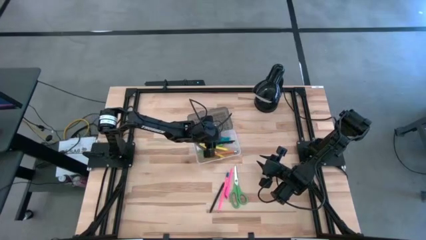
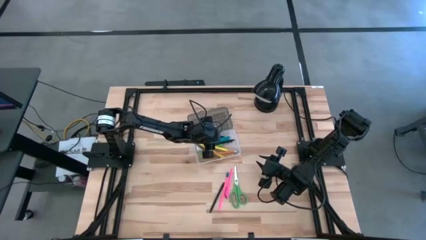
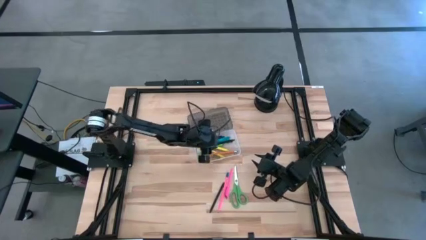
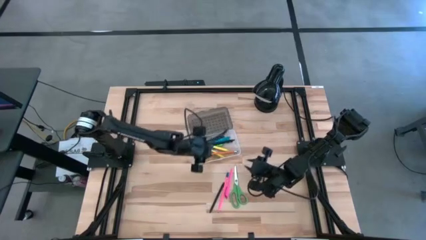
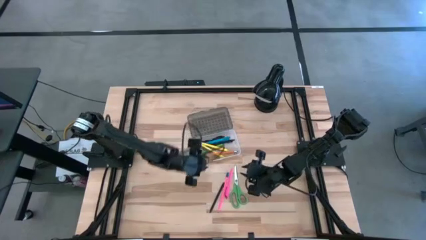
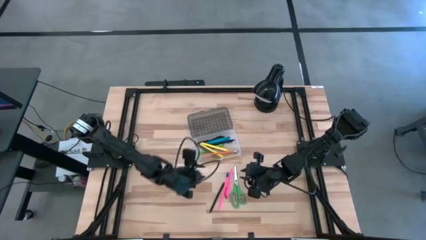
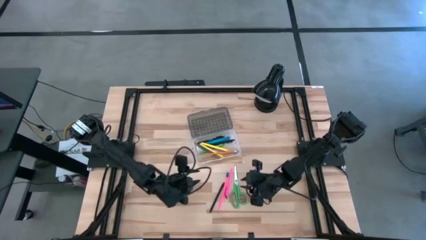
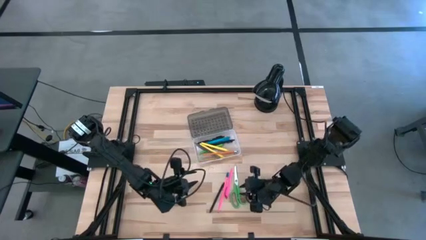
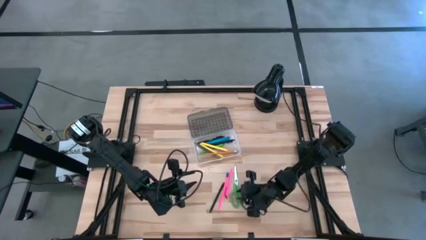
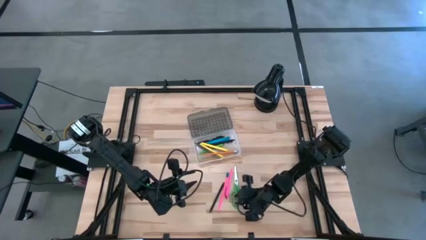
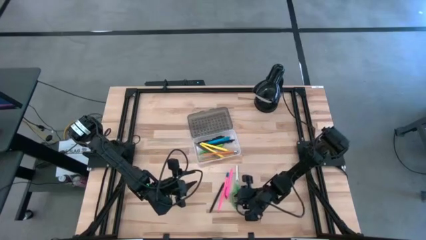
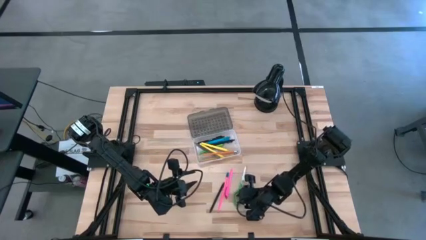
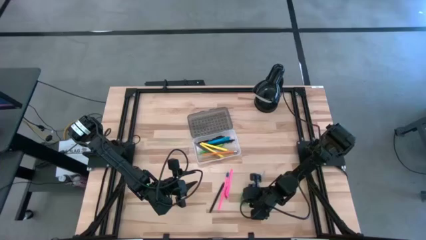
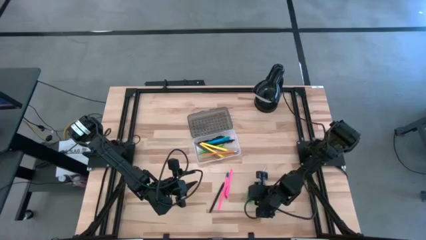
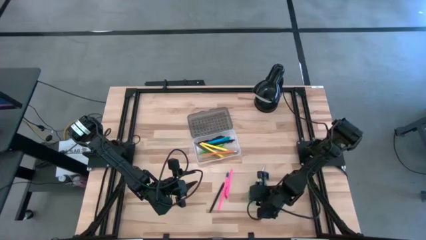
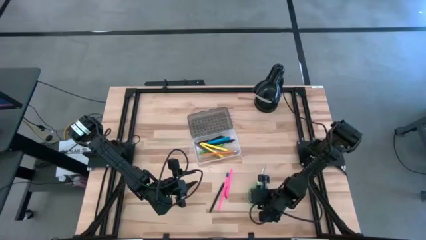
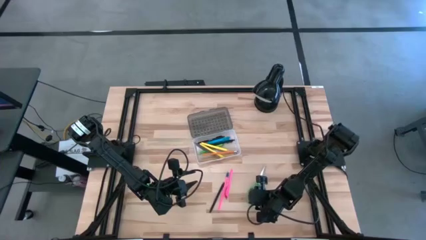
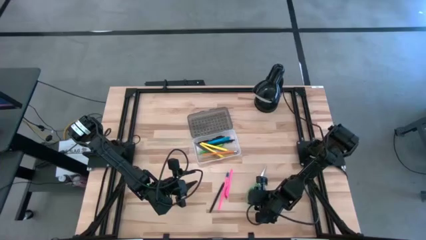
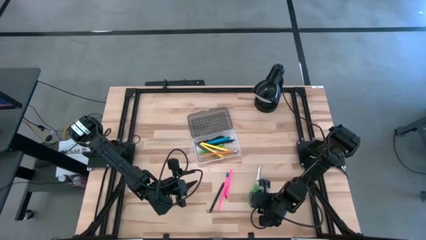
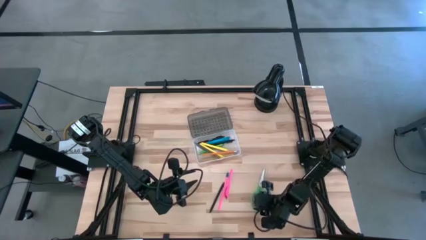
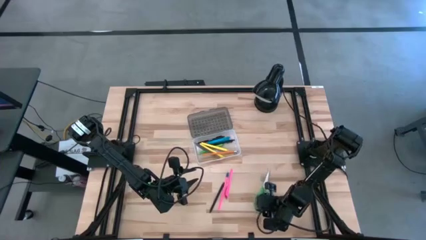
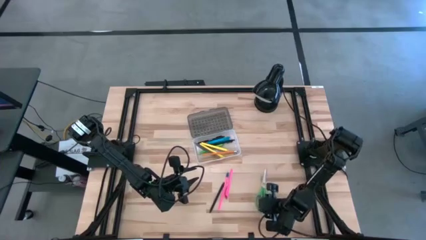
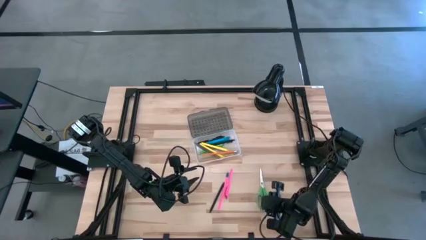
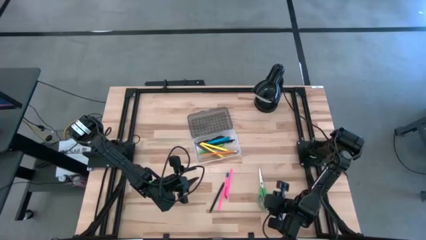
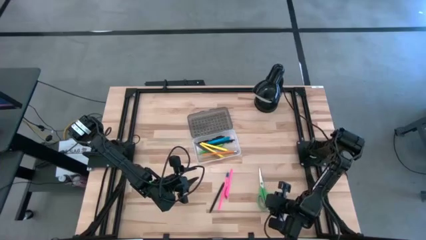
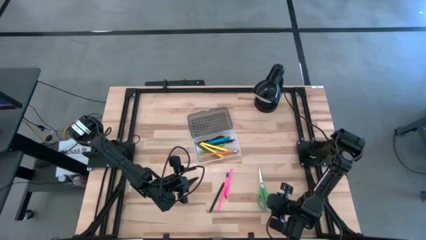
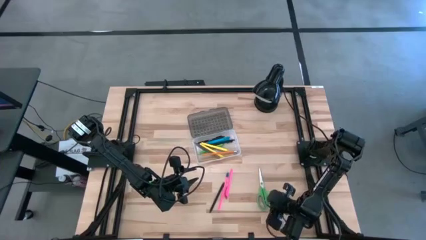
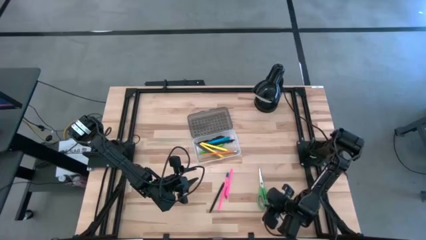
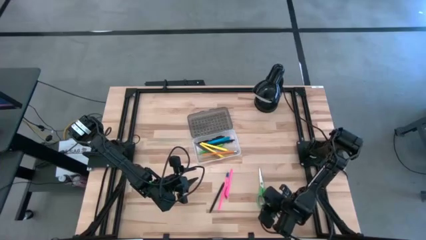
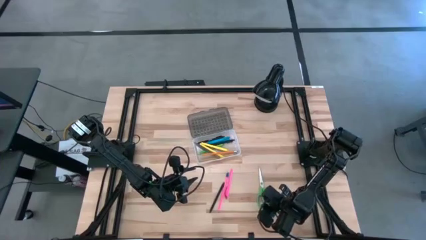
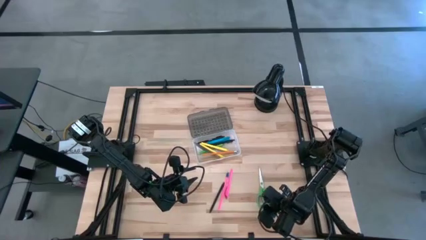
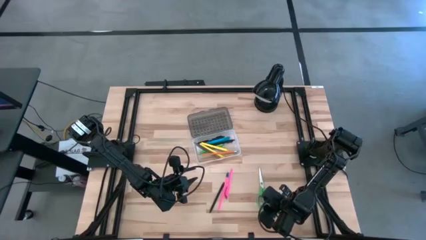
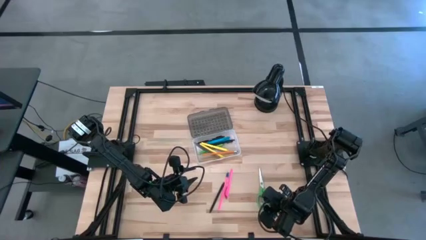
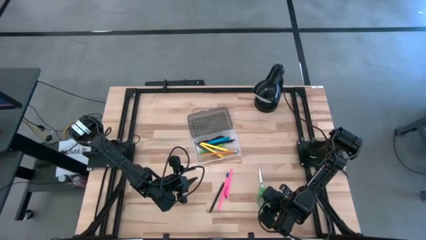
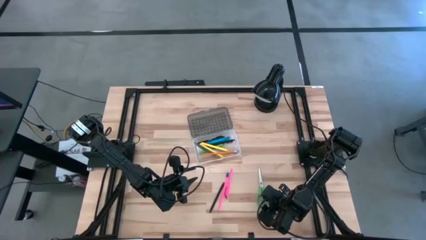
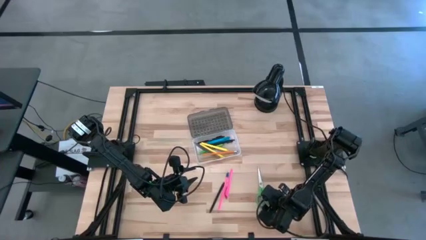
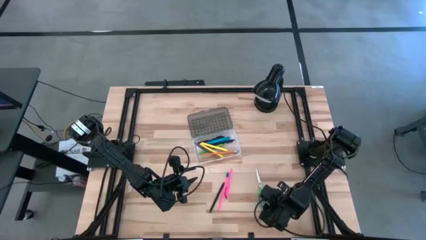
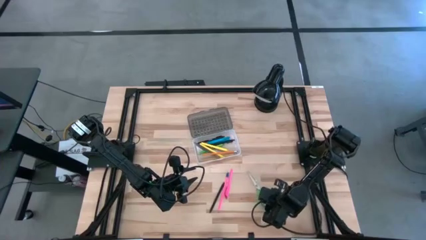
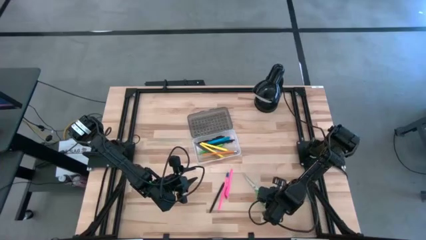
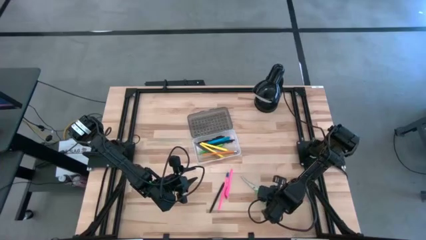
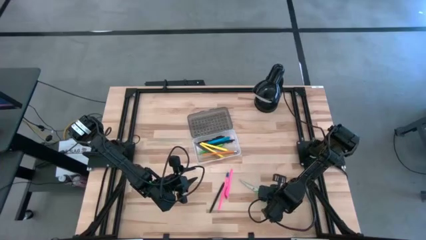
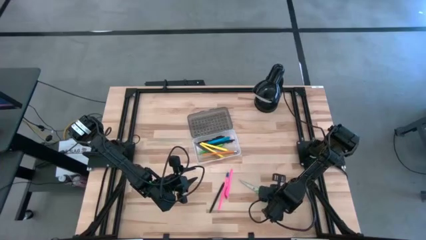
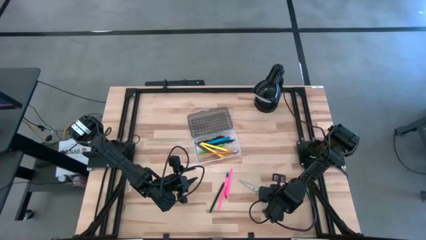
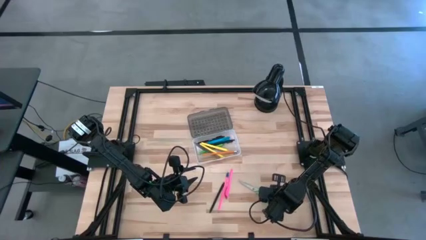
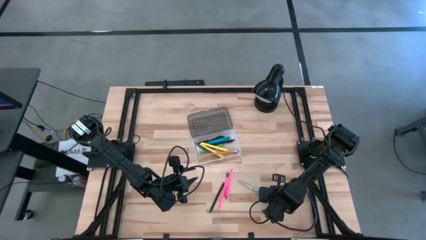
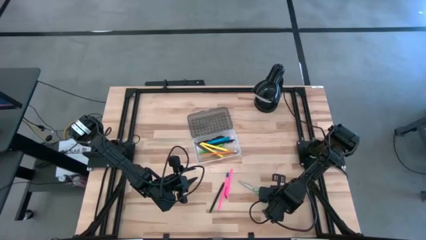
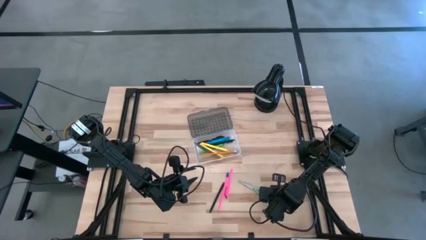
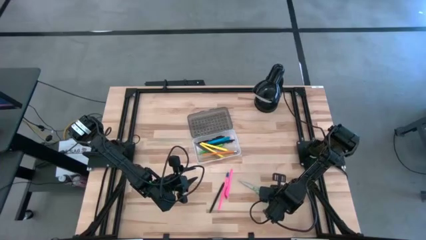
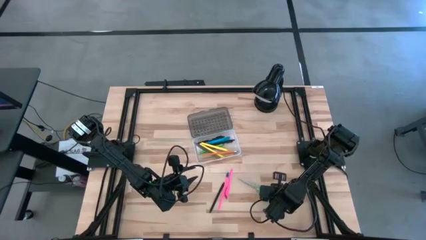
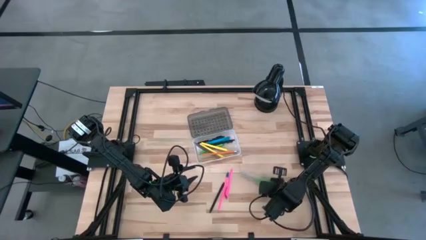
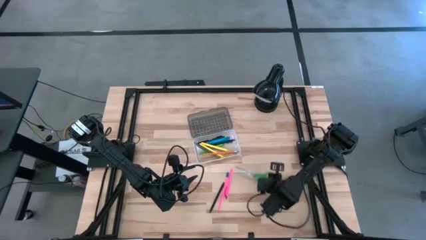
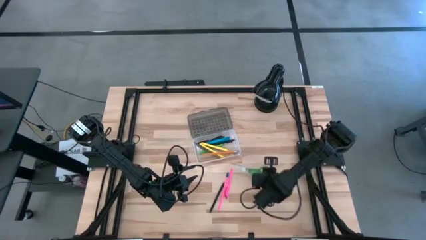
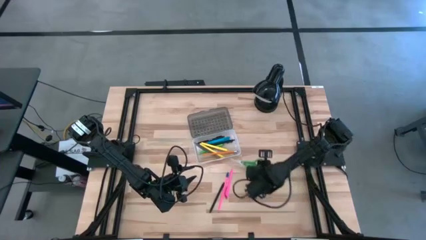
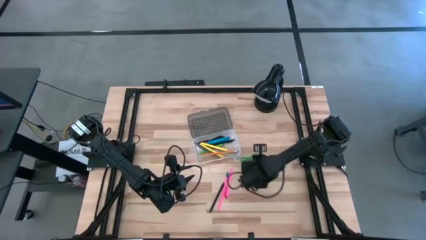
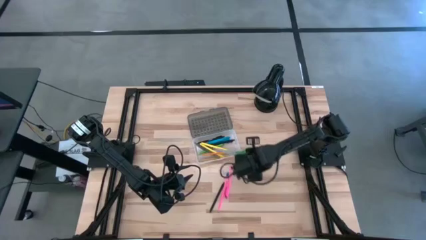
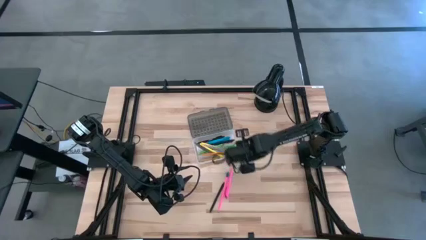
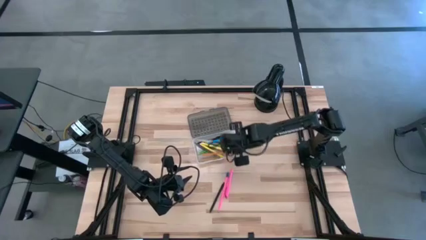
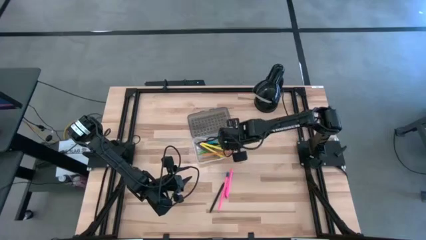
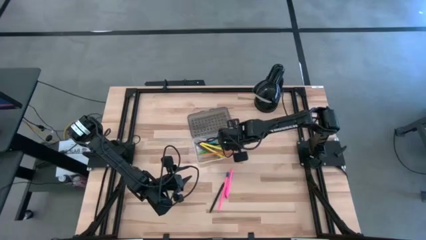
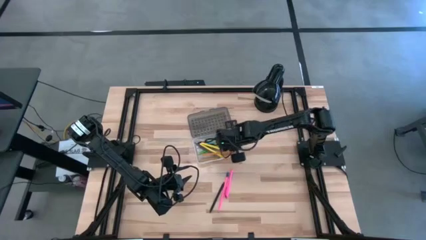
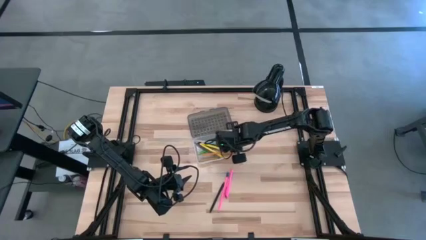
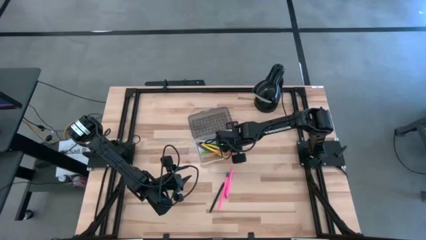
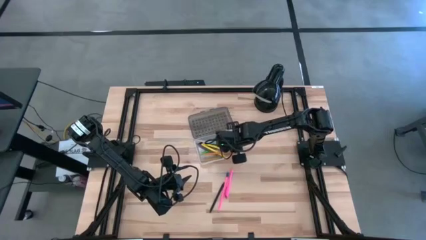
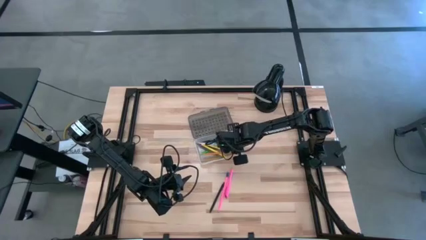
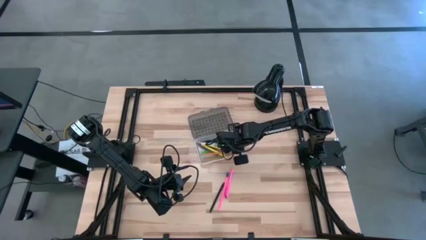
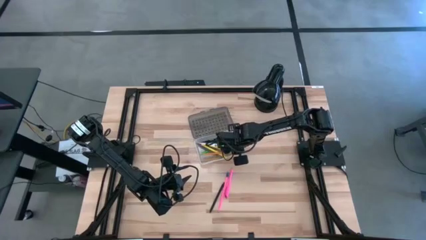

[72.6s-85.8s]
Task: Pick & place school supplies into a supply box
Put the green scissors into the transparent supply box

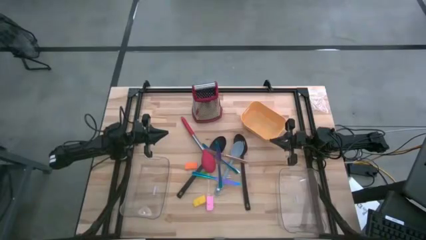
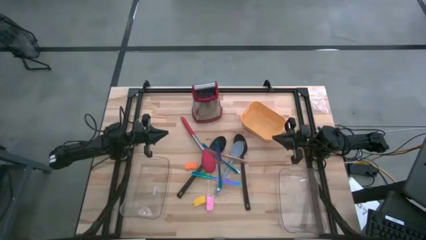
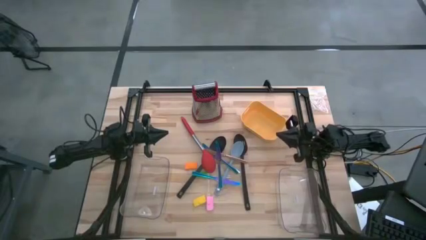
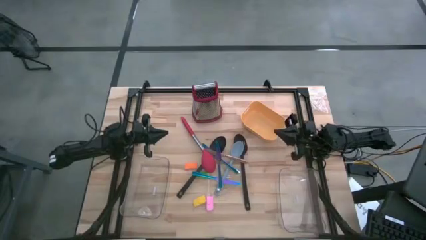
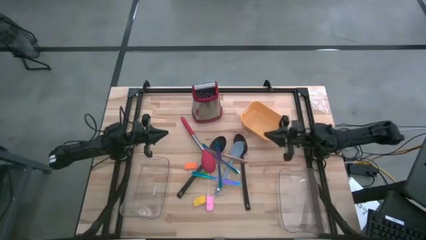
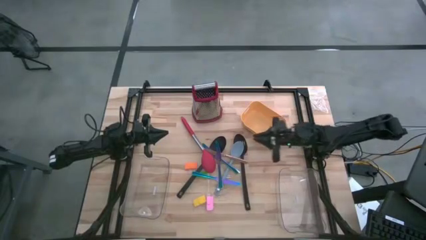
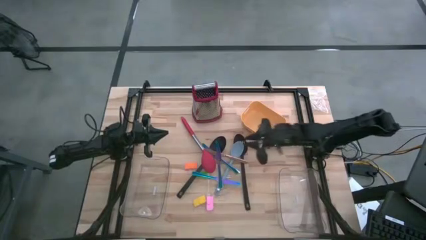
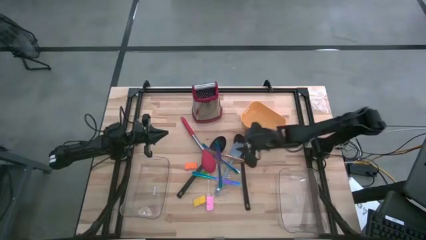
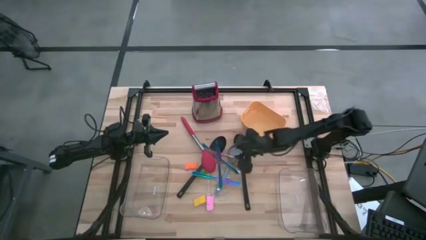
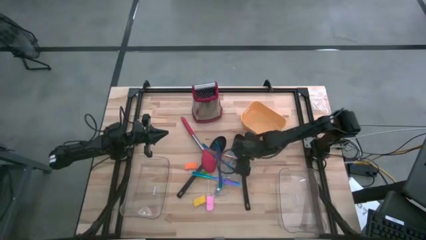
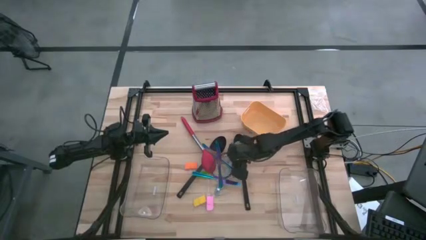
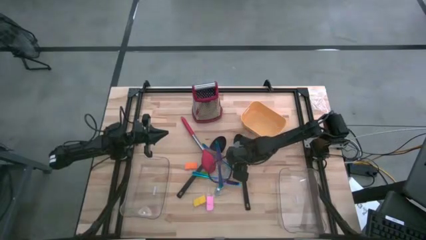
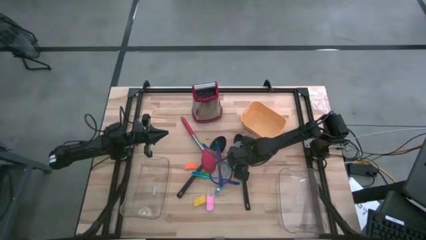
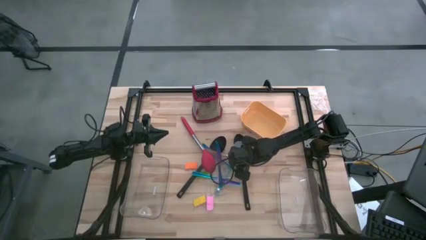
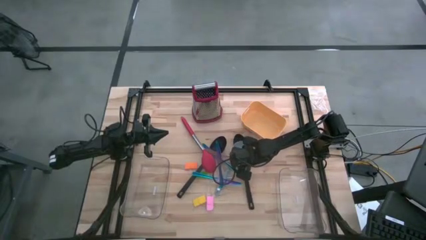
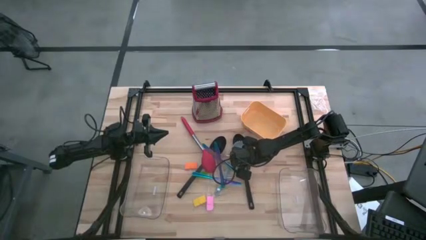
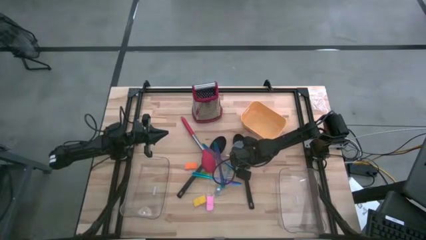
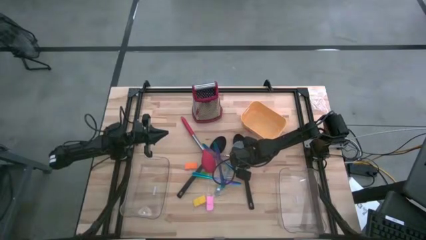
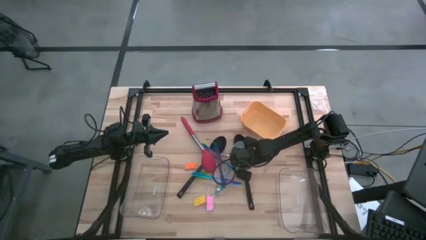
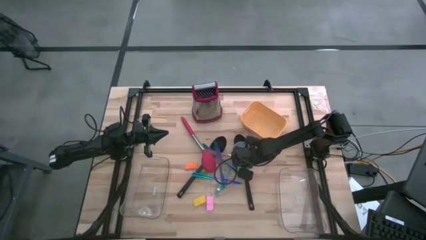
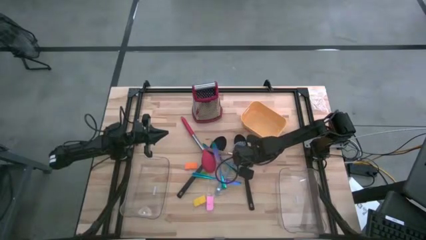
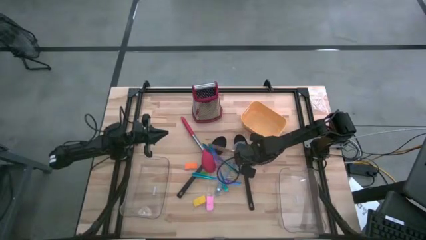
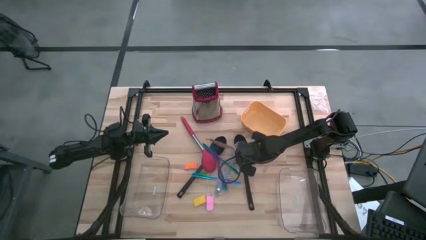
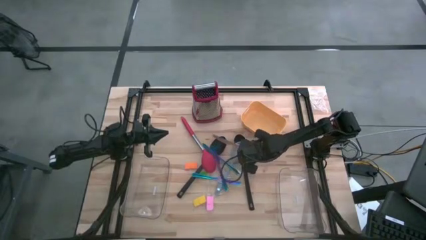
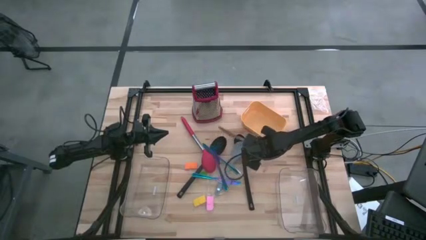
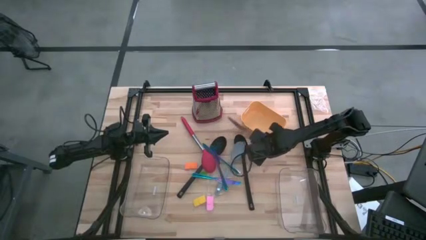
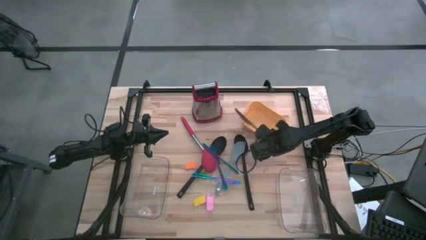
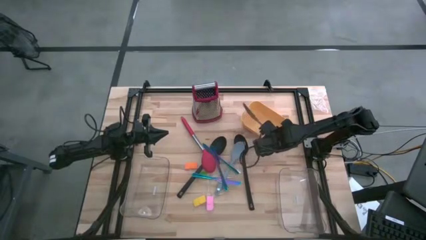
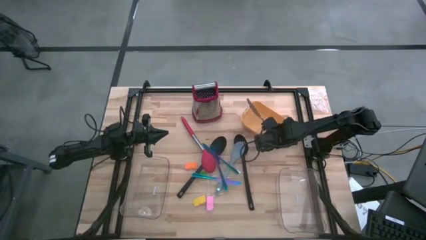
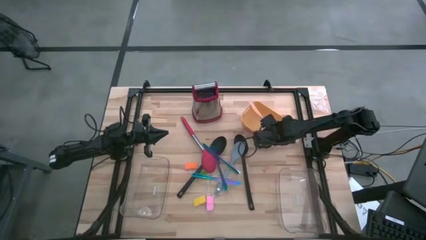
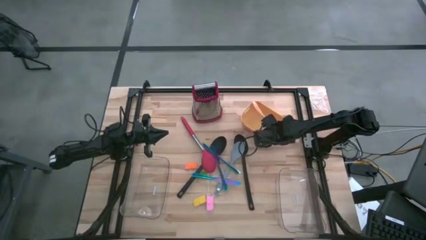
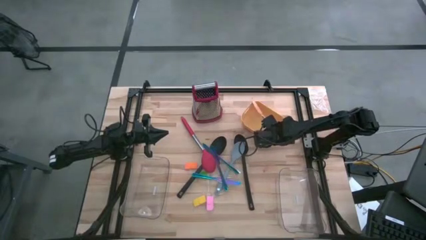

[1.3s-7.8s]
Task: Pick & Place Kitchen Items
Put the gold knife into the yellow bin
